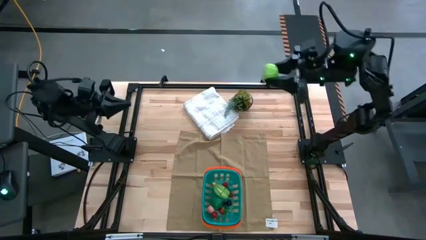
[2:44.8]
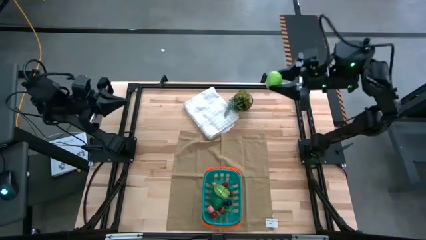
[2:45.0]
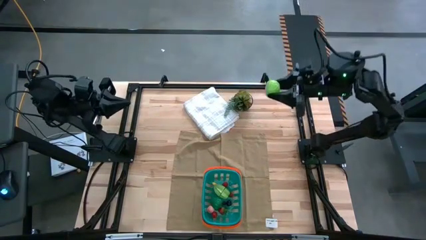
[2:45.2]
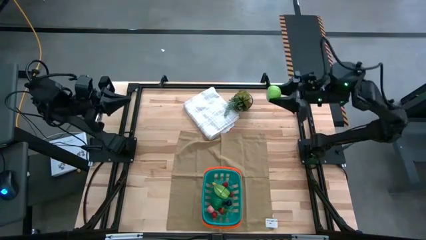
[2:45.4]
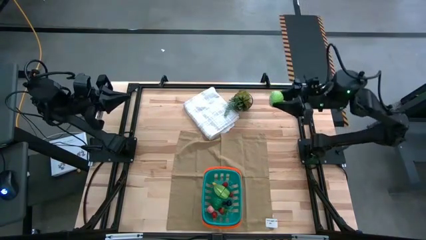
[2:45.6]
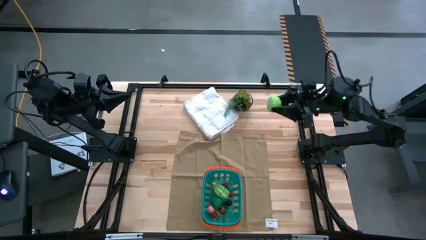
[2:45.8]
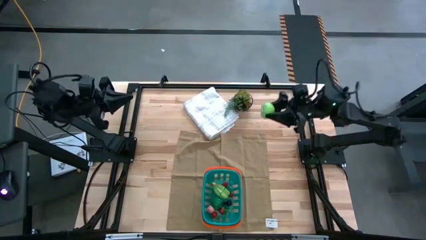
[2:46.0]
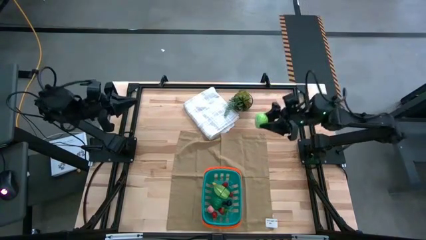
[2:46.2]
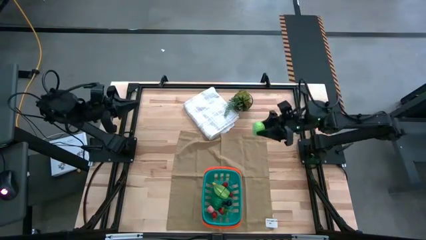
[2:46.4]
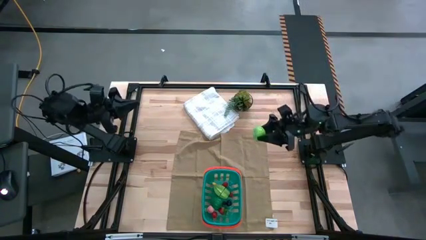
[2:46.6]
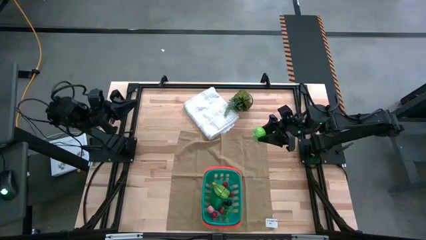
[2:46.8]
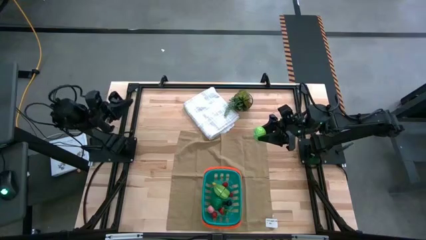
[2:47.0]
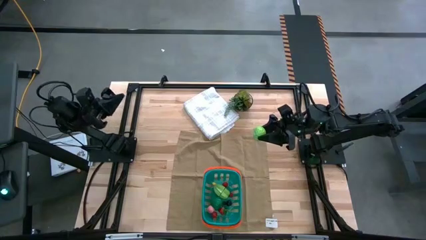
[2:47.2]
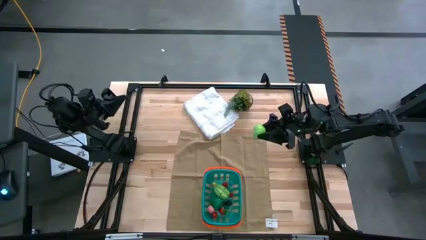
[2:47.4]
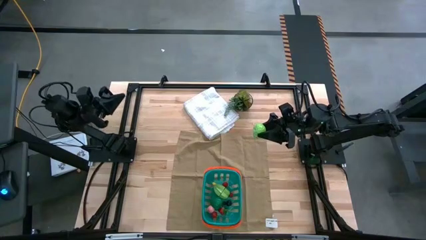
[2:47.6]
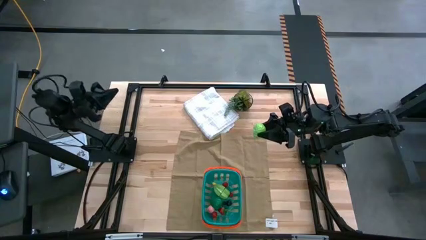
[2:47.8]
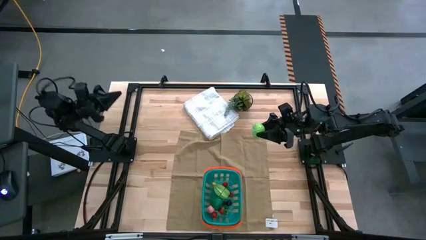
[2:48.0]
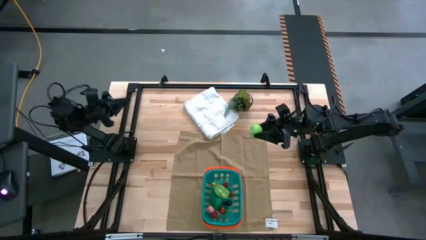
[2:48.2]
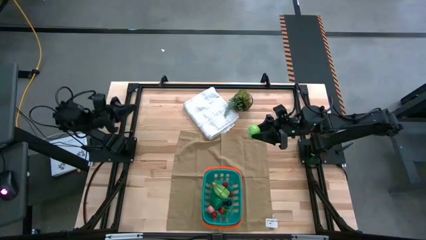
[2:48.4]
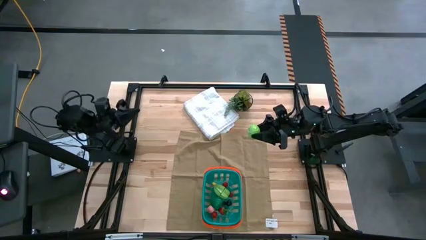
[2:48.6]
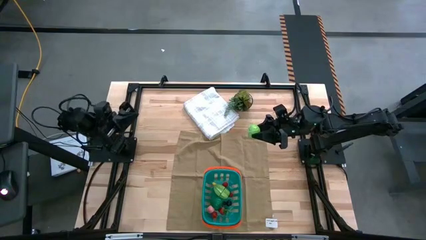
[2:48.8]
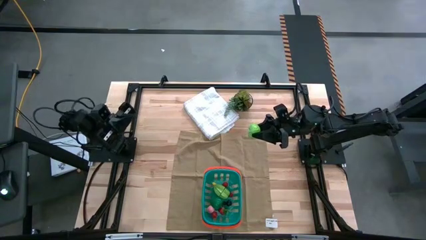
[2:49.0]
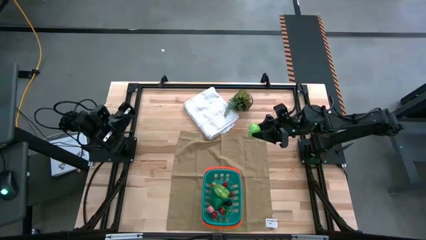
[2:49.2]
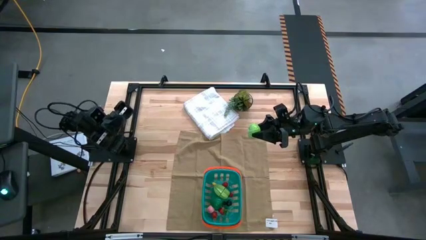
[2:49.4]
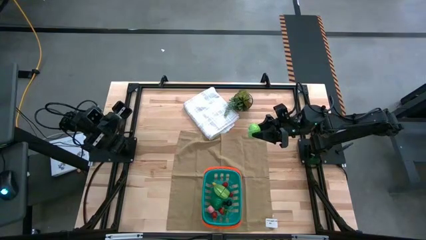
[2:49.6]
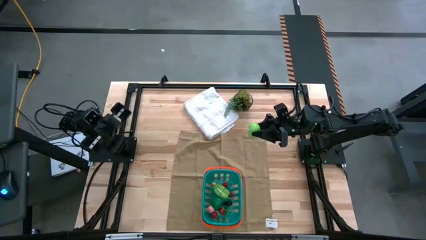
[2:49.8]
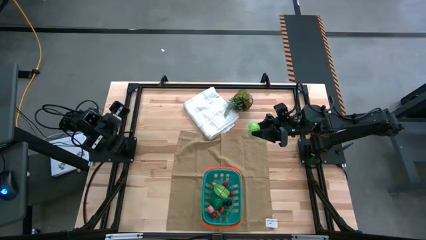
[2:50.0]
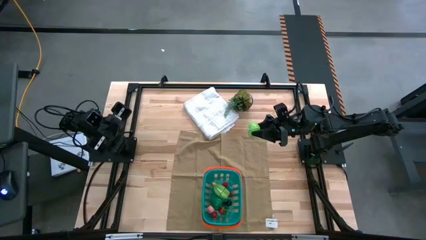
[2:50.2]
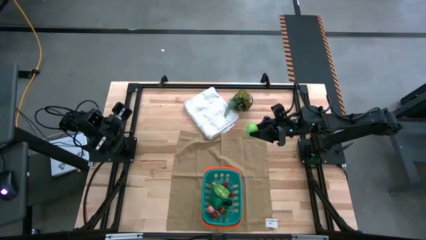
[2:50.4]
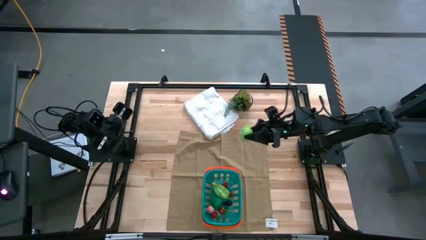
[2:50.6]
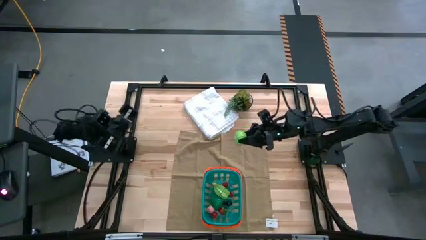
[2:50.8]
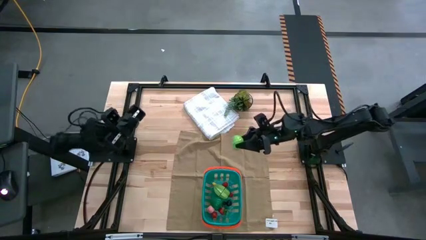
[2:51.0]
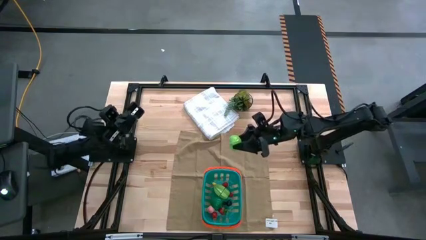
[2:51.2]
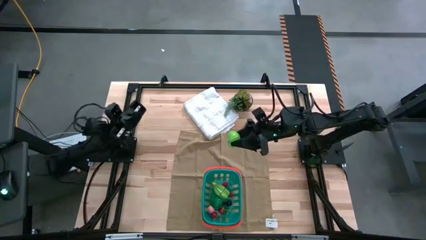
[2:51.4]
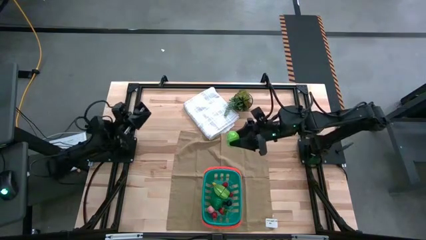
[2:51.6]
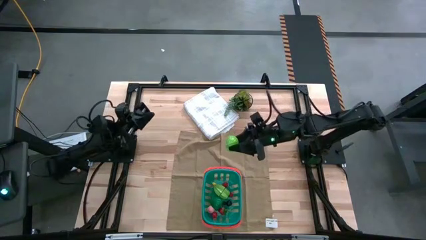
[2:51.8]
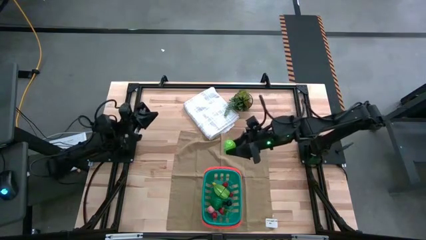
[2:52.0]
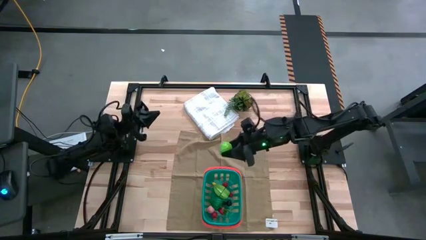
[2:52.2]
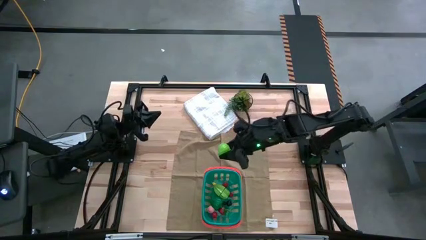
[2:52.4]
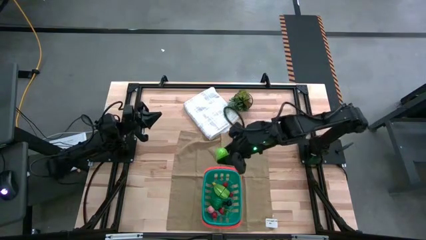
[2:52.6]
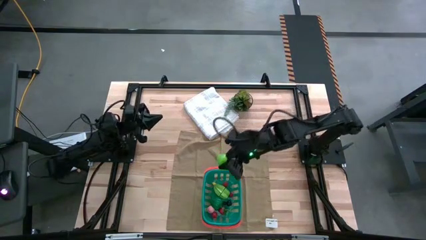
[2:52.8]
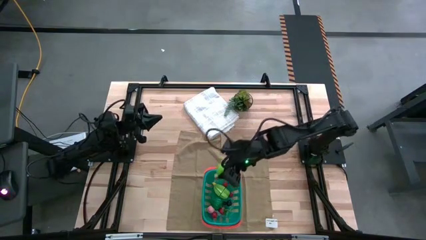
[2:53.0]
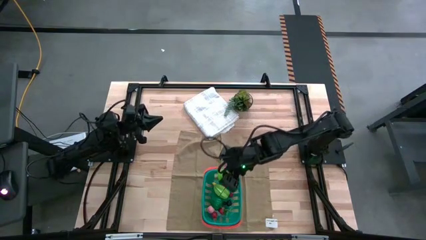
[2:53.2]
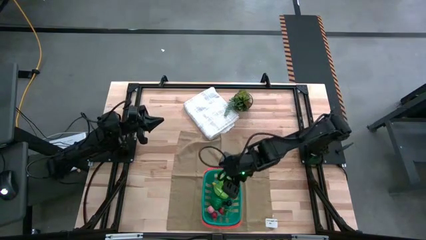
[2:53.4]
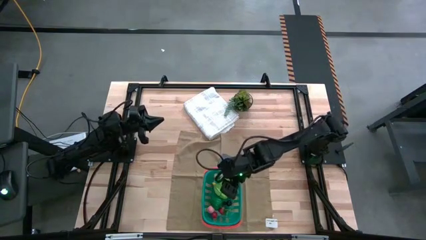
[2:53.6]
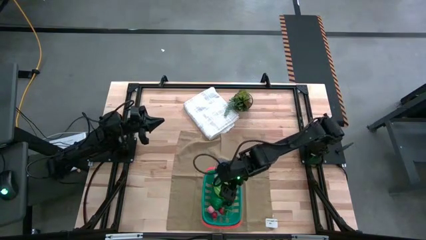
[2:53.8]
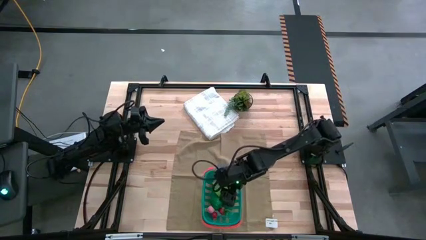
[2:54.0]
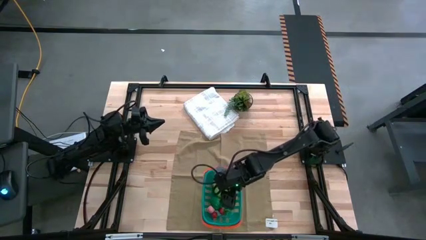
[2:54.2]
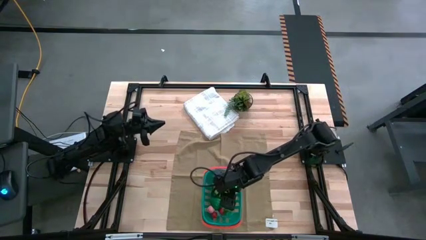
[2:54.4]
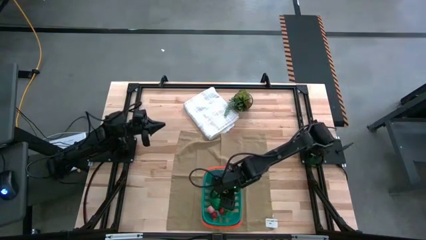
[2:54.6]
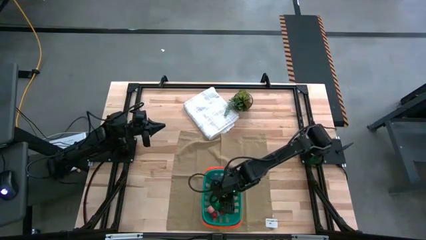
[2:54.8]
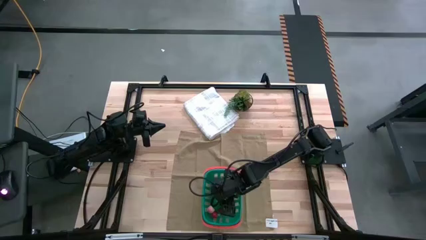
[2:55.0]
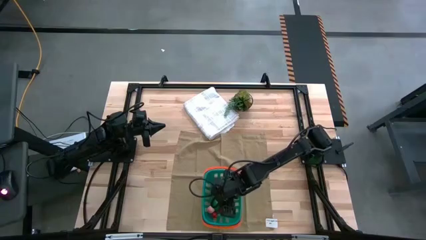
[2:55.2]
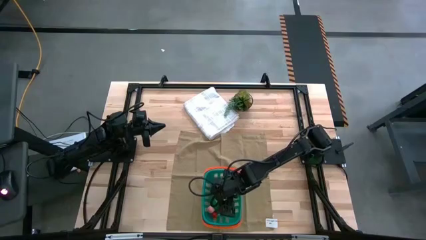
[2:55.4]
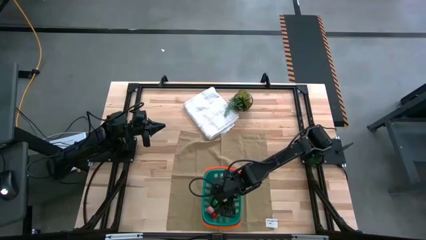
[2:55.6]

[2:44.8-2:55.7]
Task: Pick and placing Produce into tupperware
Put the green cabbage into the blue bin

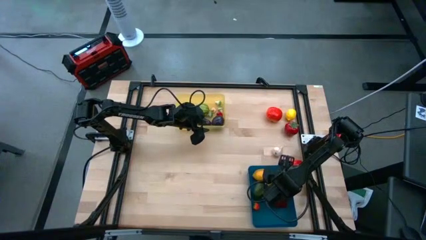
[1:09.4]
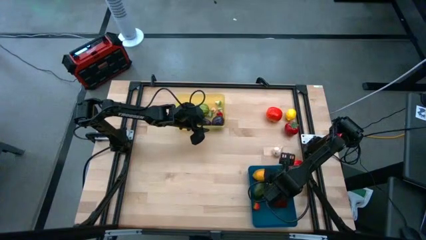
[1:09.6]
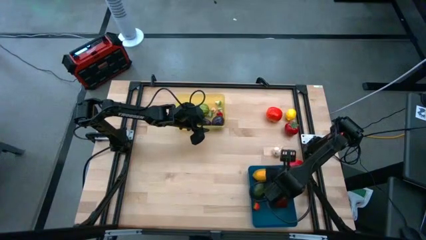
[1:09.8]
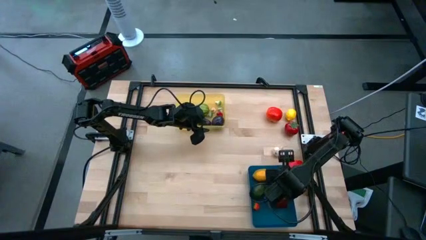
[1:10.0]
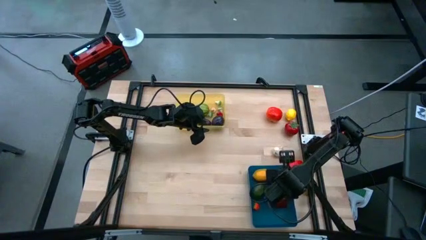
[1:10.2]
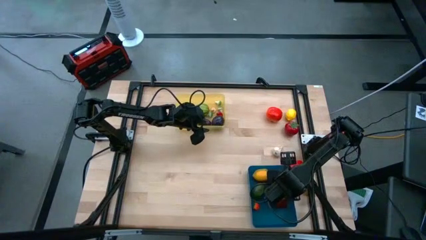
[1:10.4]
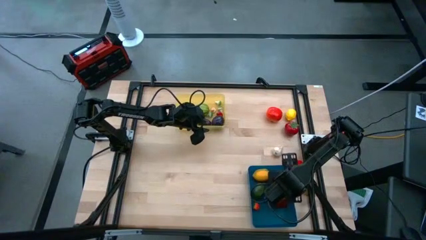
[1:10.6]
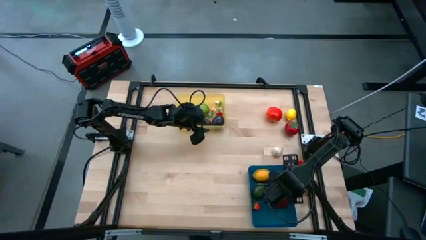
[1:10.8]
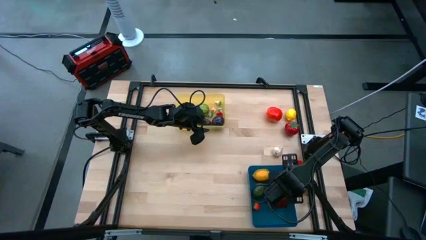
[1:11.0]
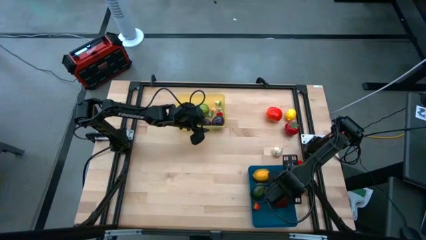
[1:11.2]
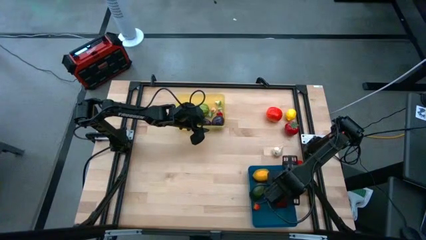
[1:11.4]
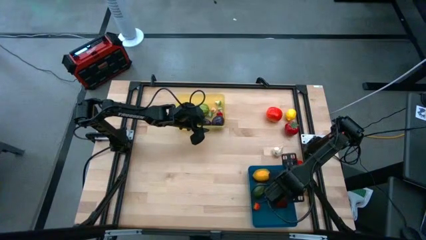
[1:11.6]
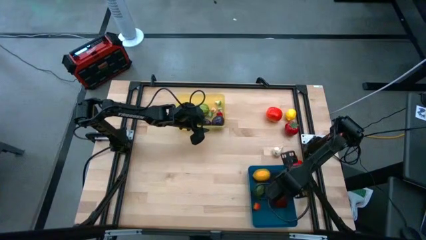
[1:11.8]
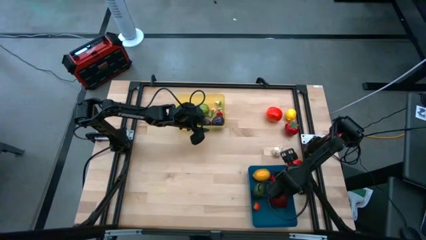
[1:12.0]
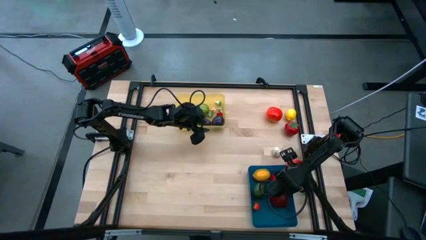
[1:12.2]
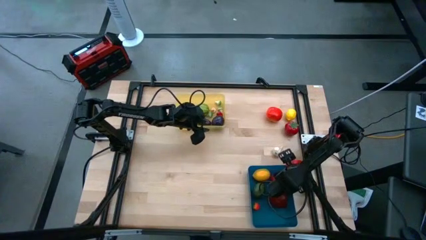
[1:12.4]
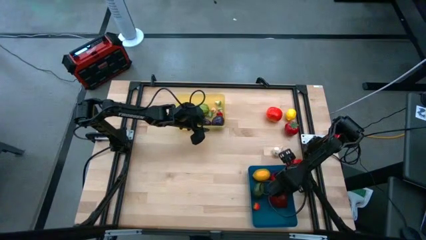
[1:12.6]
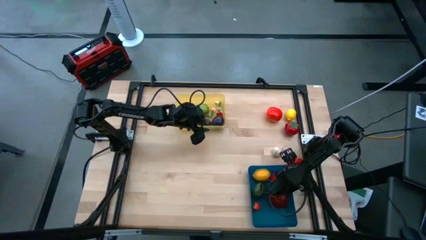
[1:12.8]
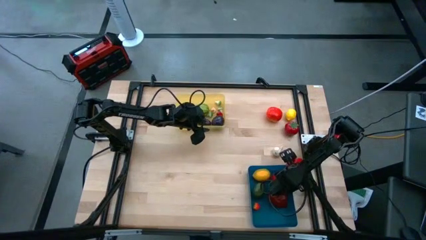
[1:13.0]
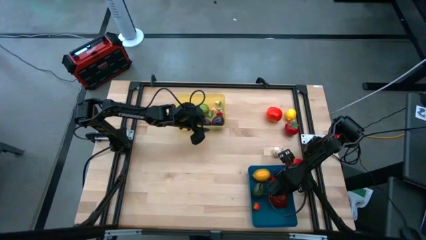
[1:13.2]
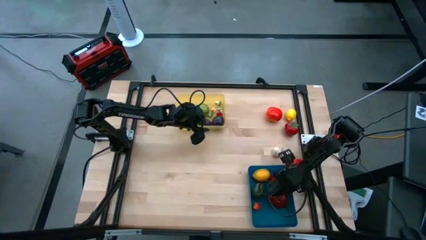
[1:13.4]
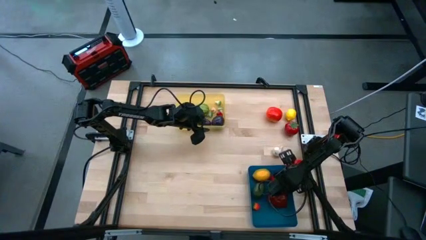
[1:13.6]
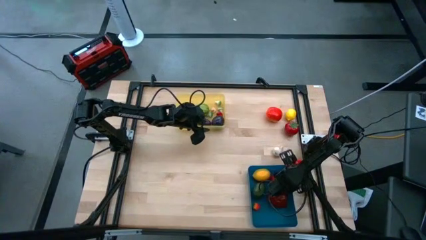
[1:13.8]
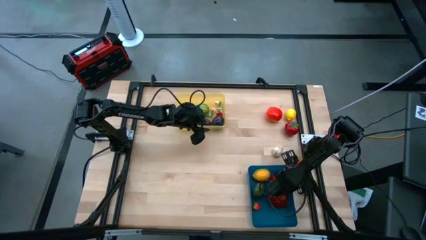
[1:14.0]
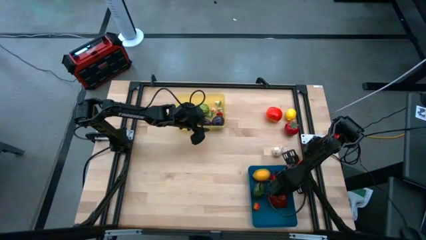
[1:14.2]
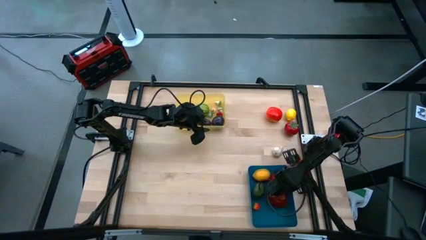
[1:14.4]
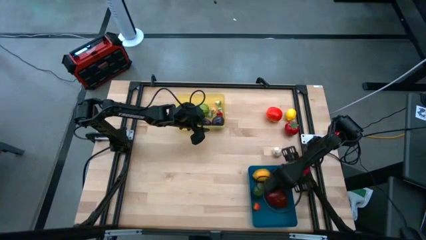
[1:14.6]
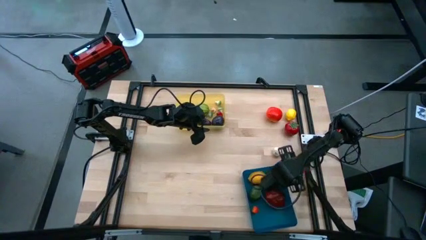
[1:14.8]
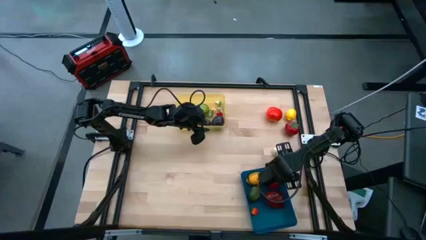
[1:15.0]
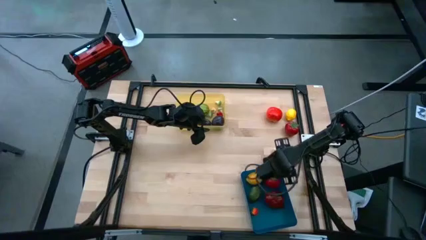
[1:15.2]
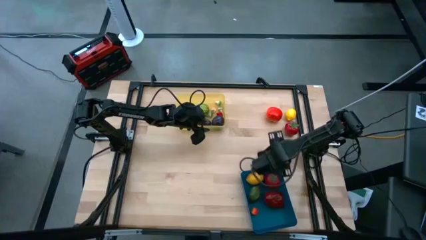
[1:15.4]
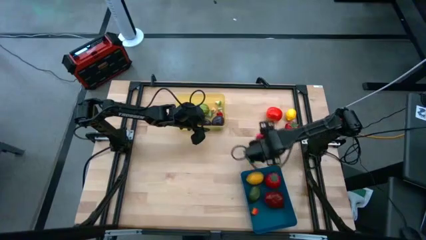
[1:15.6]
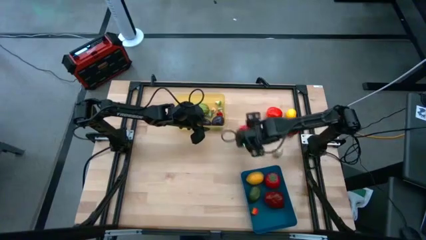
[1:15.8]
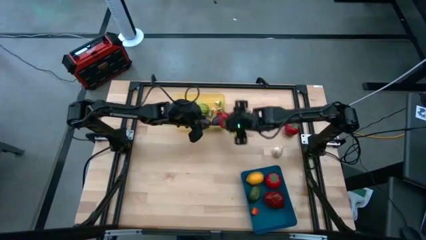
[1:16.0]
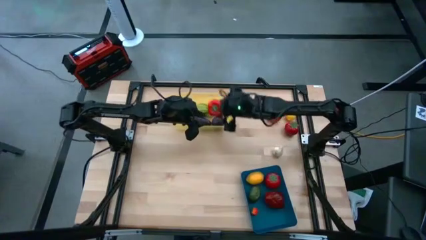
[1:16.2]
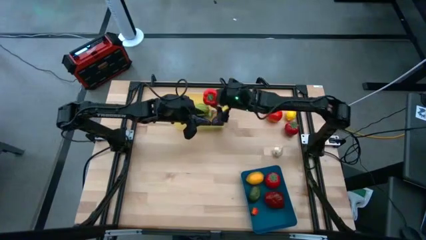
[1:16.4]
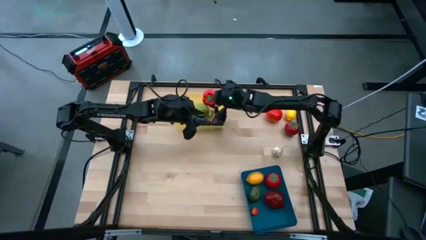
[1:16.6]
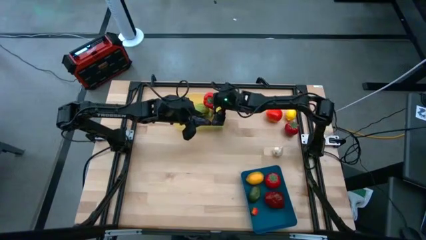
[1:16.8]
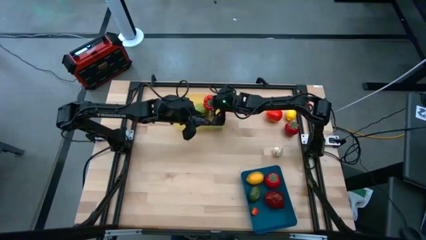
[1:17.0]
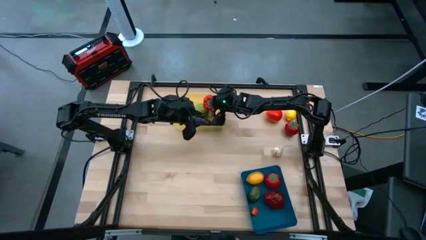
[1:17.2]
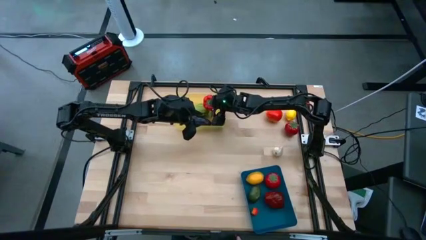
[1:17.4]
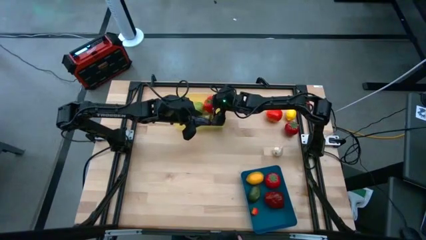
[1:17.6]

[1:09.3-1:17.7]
Task: Sort produce into baskets
Put the red bell pepper into the yellow bin
